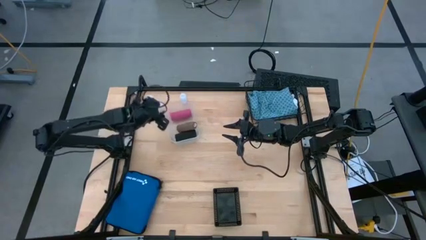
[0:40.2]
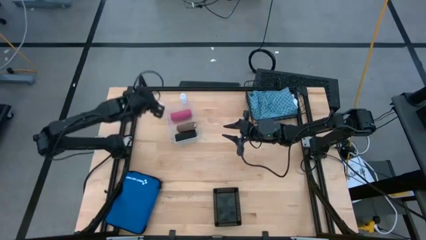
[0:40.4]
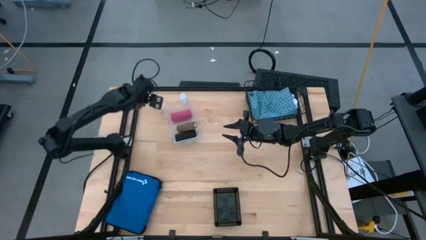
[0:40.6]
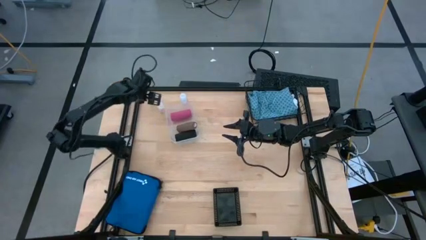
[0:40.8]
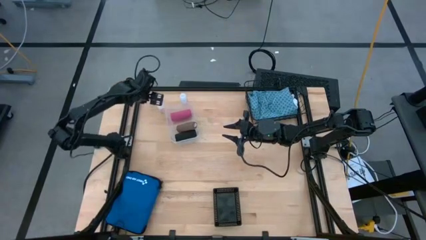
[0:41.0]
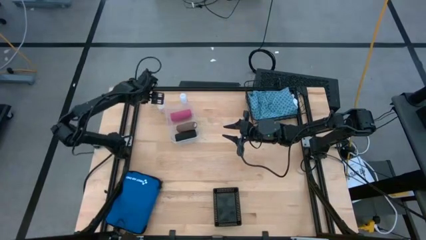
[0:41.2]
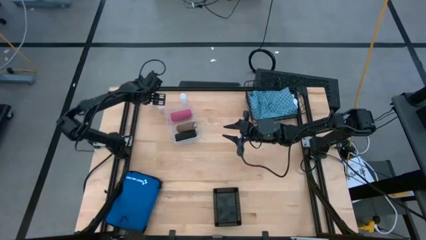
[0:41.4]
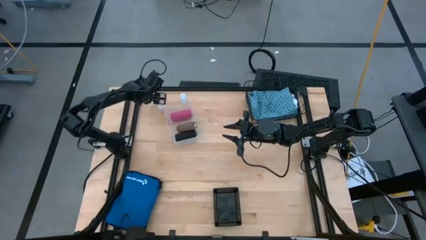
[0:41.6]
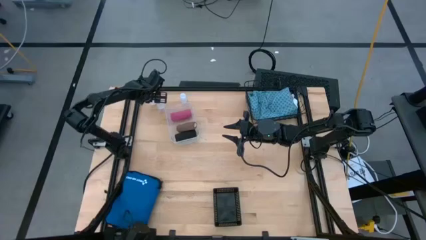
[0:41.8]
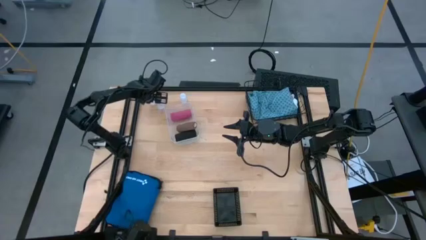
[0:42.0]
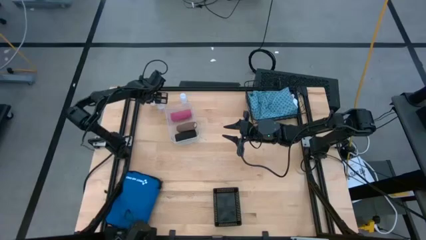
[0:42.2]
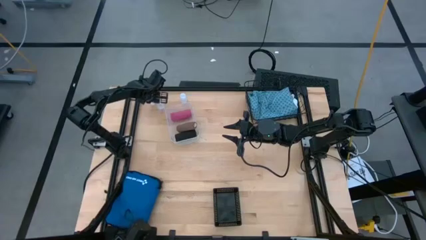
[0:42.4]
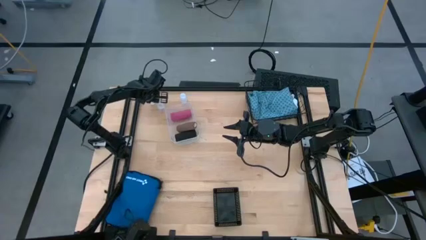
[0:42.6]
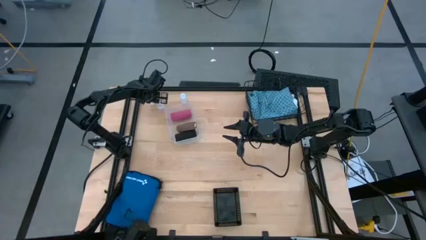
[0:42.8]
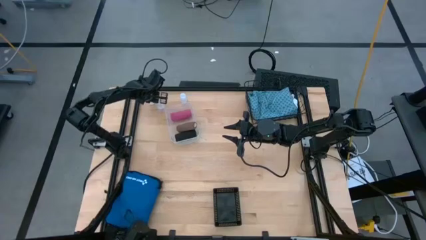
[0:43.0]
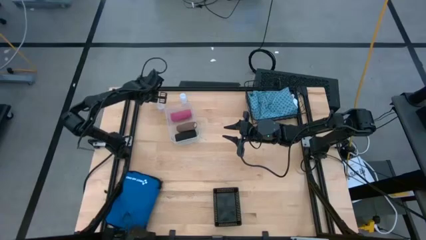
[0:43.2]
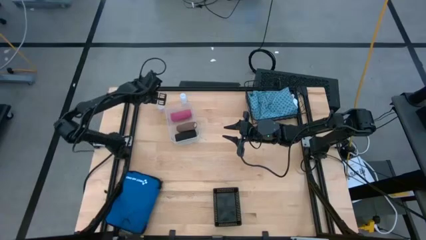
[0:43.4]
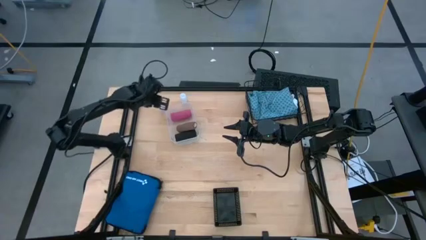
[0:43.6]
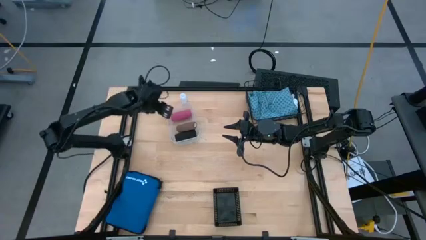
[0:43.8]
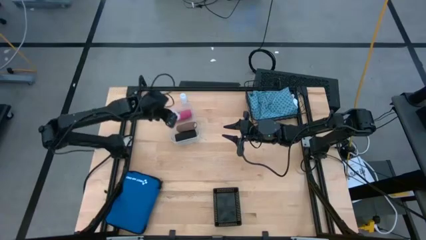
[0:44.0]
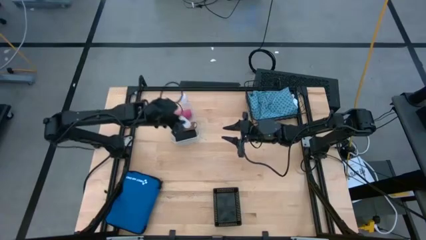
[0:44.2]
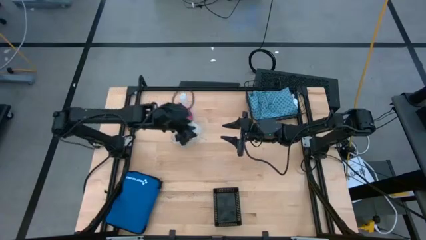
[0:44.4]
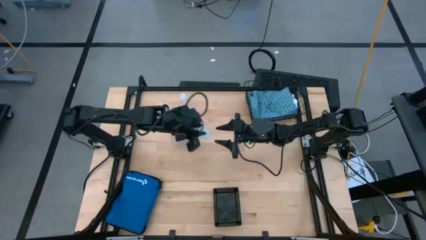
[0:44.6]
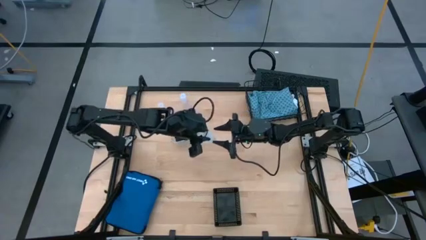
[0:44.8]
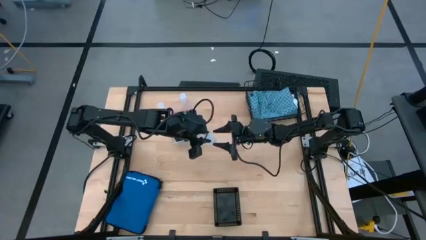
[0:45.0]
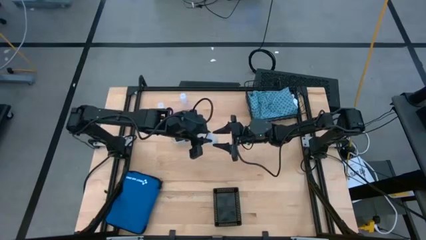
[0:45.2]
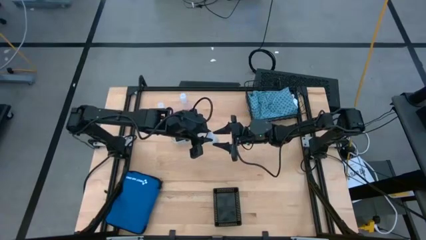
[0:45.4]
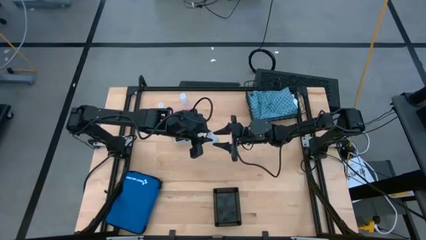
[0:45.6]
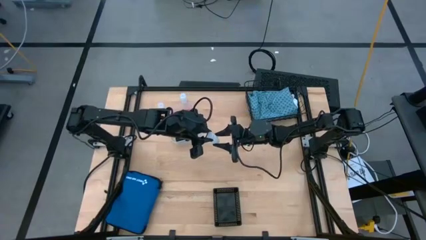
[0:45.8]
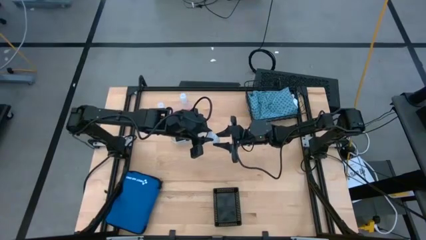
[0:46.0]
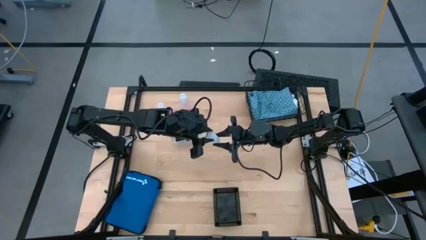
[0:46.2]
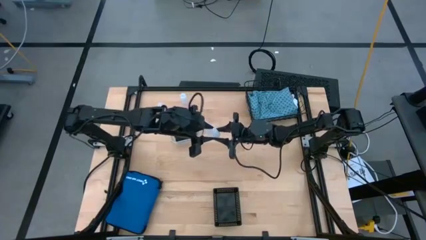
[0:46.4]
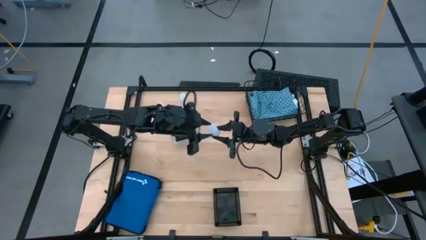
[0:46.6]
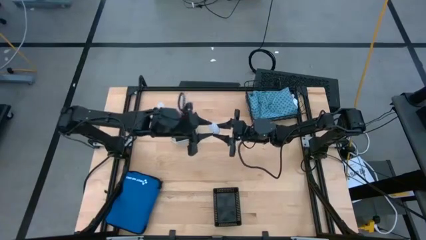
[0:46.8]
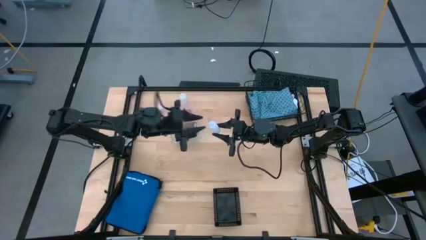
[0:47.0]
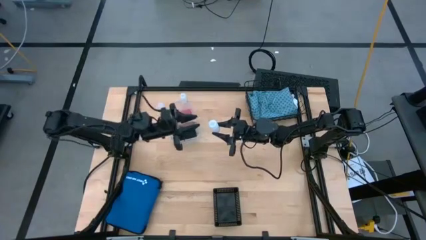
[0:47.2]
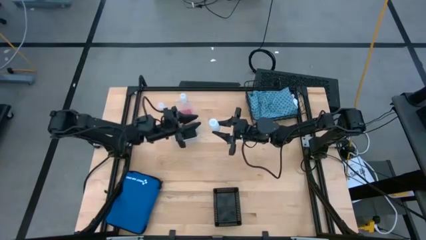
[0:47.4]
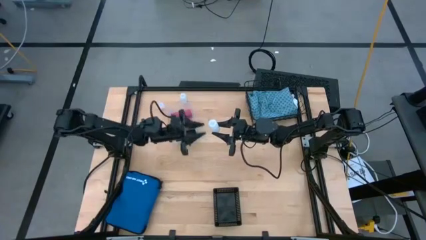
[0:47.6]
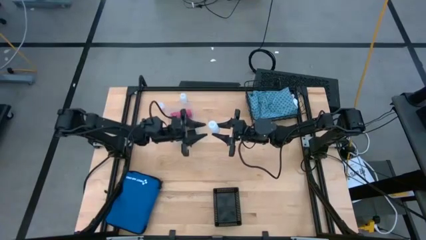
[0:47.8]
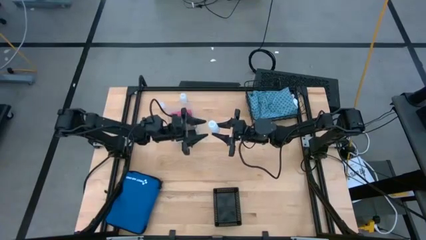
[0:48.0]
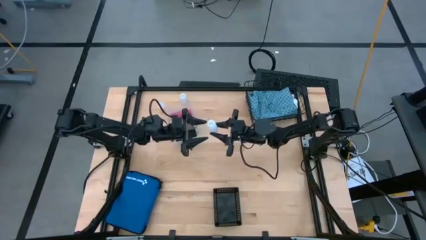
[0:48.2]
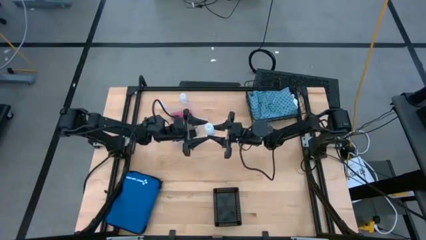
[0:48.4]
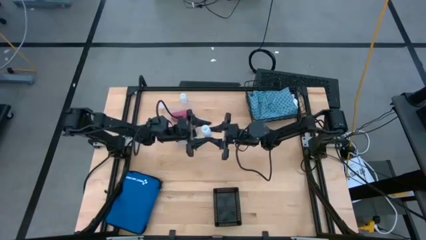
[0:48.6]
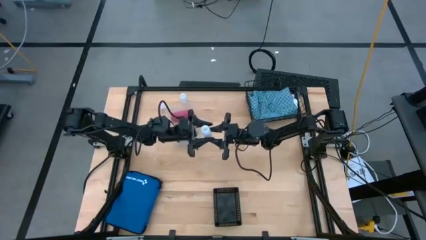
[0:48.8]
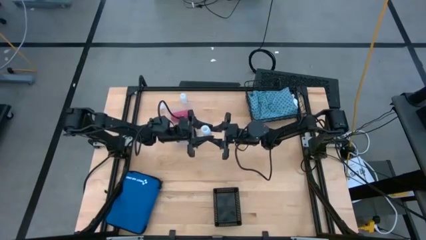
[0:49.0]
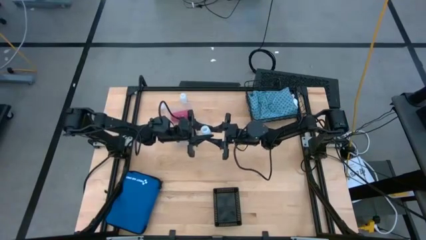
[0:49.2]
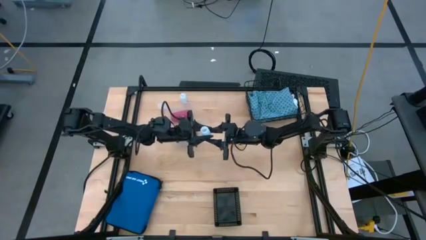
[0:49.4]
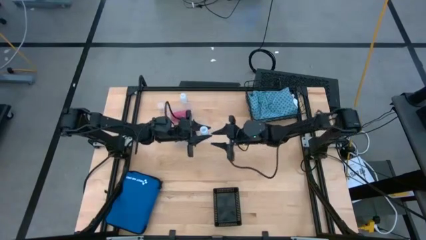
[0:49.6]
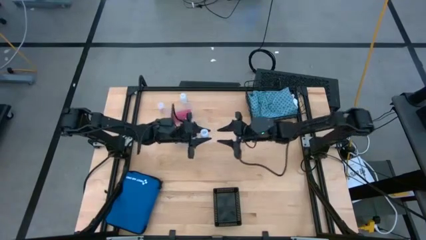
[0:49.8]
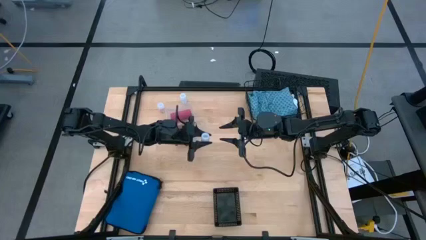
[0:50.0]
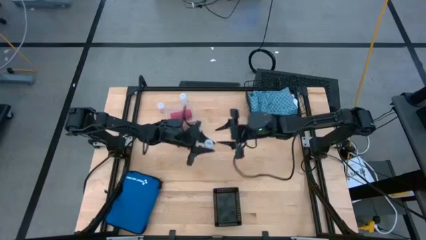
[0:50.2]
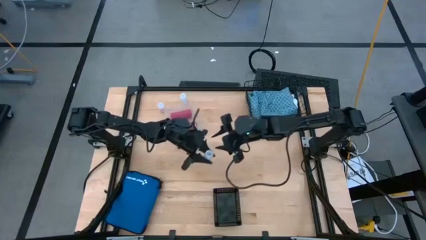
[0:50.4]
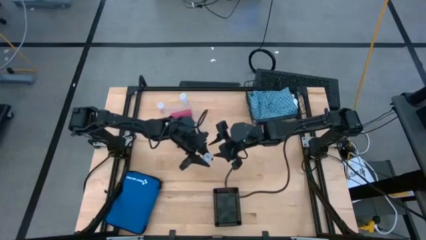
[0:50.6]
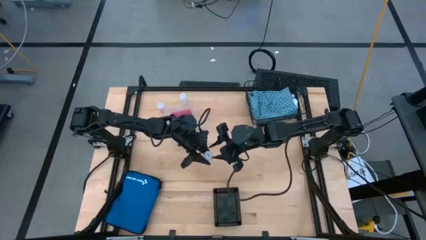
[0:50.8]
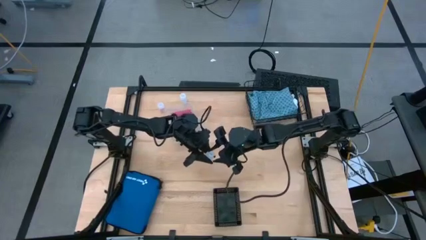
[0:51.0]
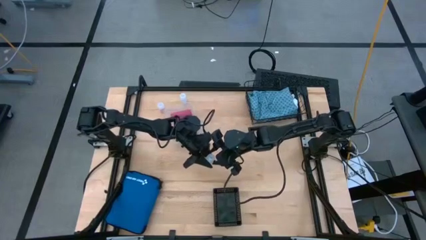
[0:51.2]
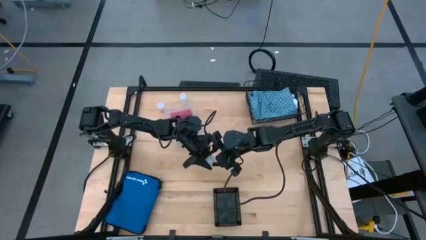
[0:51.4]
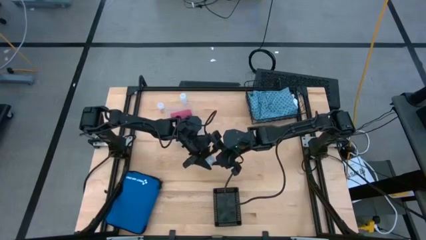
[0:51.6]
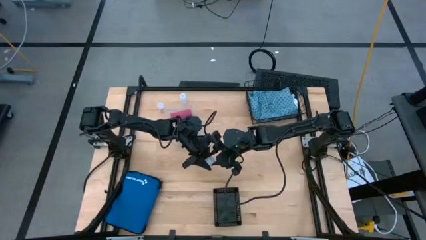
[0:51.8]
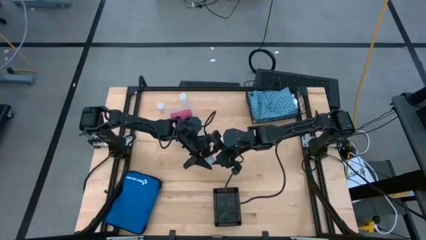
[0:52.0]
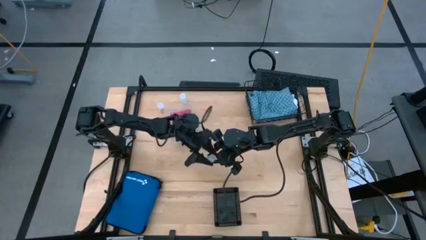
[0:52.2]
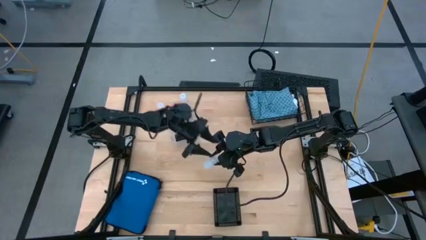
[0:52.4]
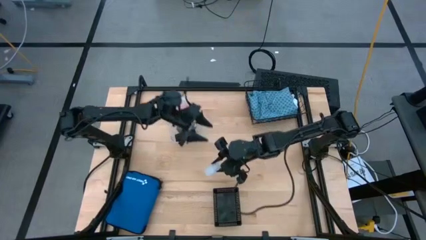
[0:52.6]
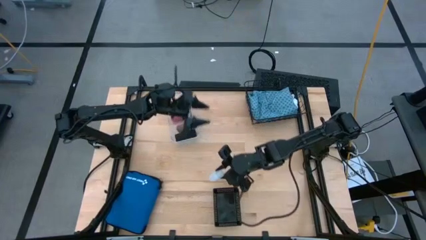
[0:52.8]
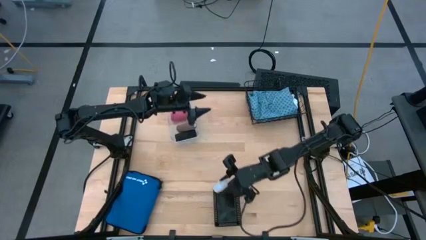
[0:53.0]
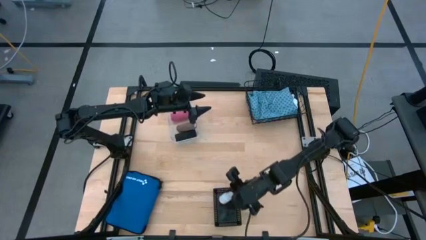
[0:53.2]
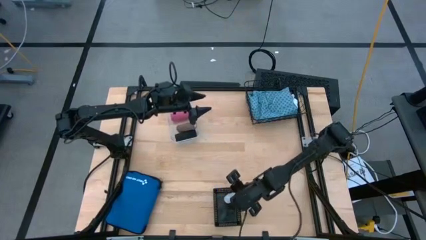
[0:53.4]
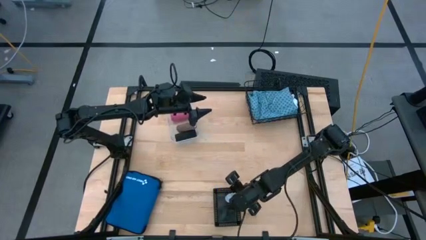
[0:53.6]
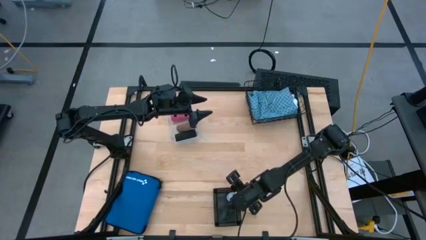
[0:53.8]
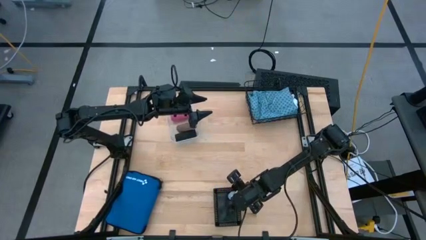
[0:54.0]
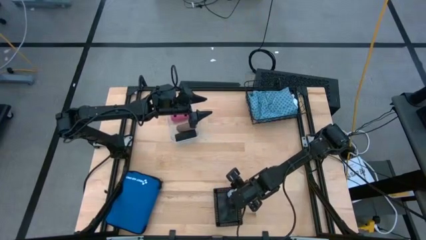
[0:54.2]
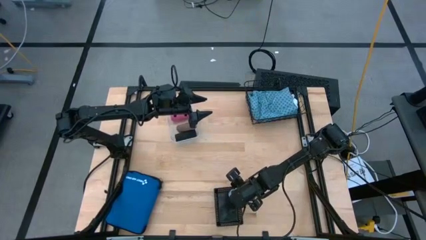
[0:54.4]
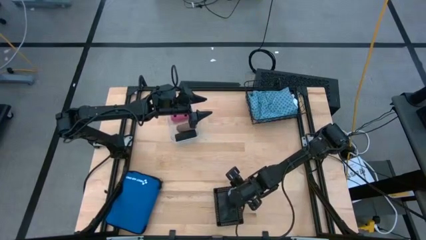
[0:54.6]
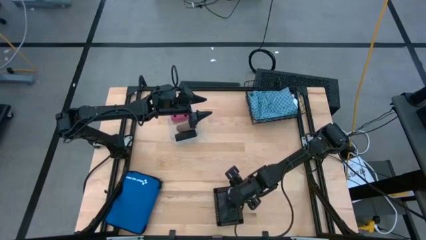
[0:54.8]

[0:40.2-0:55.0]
Task: Pick & Place Medicine items
Put the top left transparent pill bottle into the black bin
